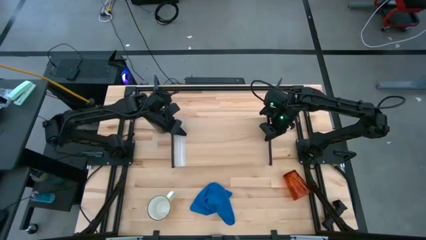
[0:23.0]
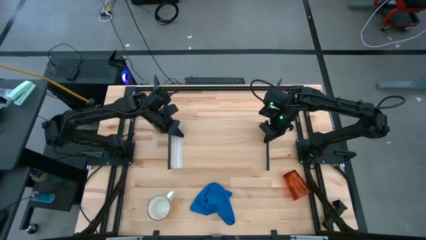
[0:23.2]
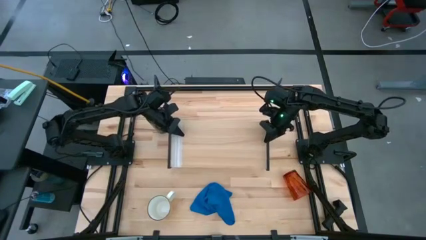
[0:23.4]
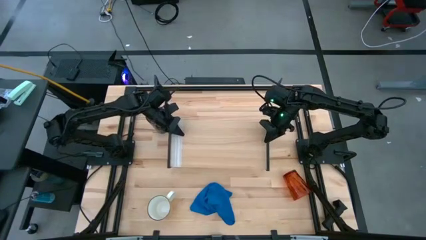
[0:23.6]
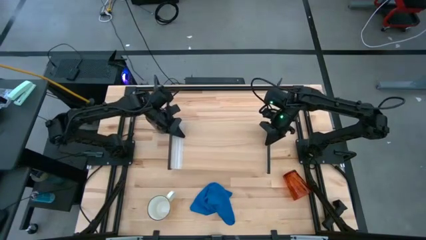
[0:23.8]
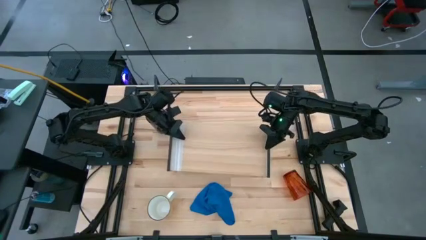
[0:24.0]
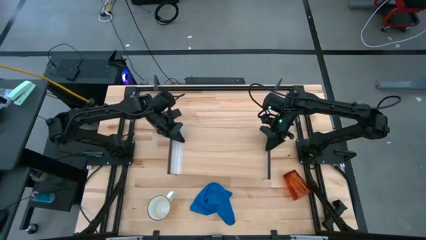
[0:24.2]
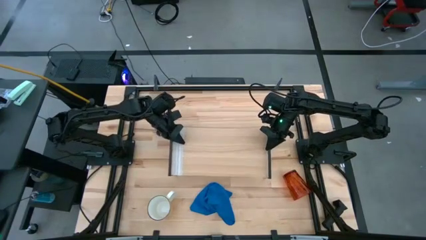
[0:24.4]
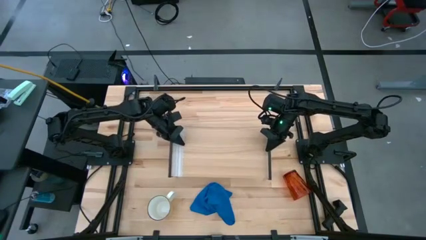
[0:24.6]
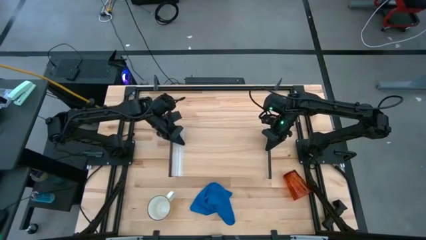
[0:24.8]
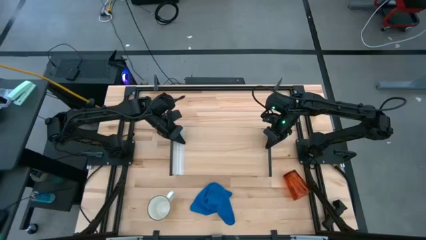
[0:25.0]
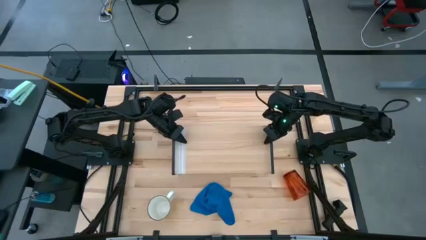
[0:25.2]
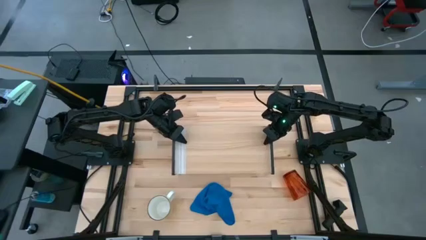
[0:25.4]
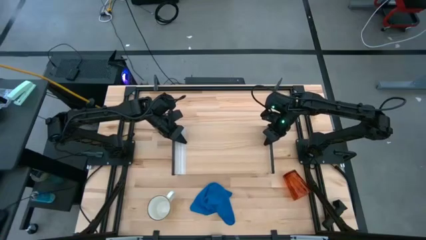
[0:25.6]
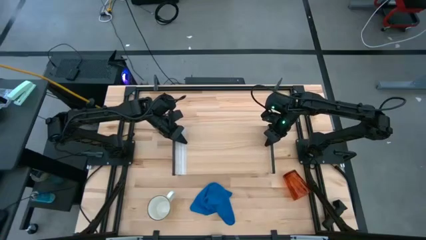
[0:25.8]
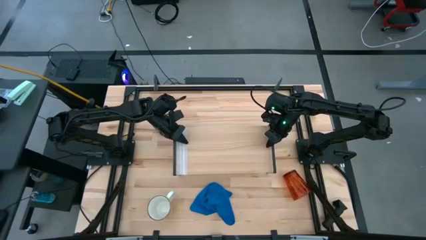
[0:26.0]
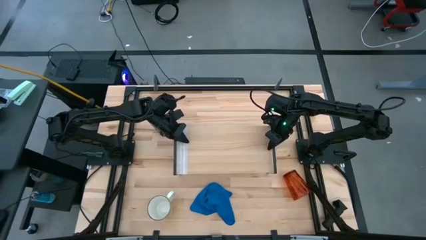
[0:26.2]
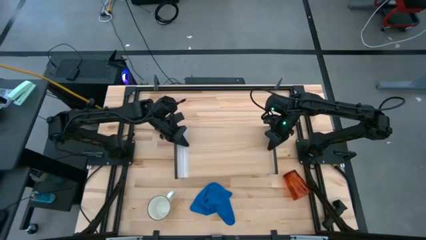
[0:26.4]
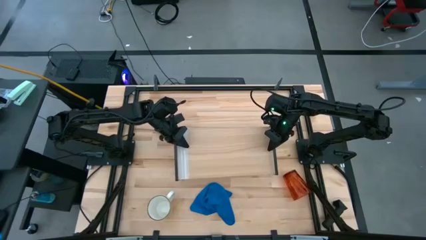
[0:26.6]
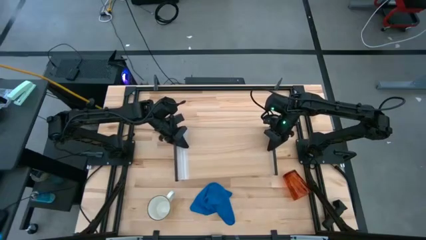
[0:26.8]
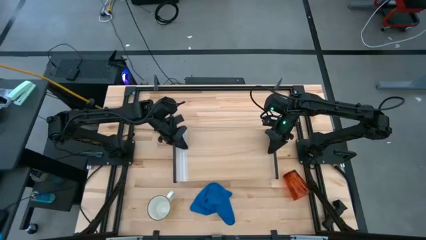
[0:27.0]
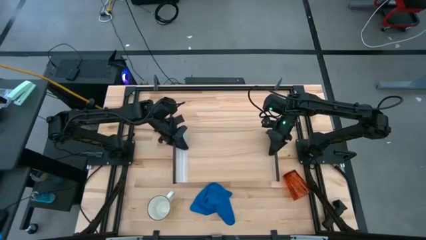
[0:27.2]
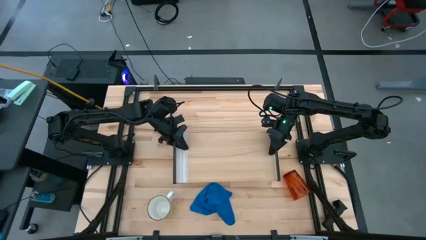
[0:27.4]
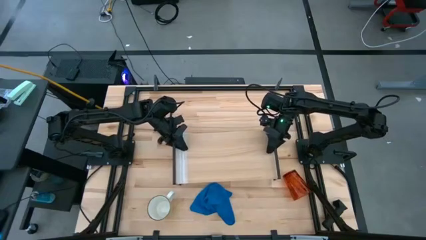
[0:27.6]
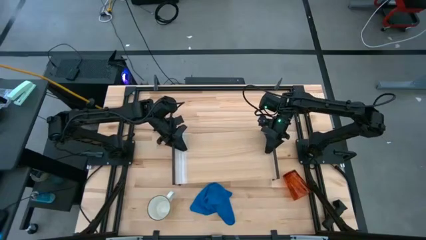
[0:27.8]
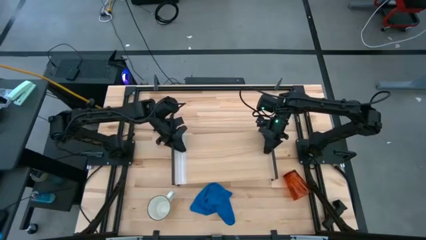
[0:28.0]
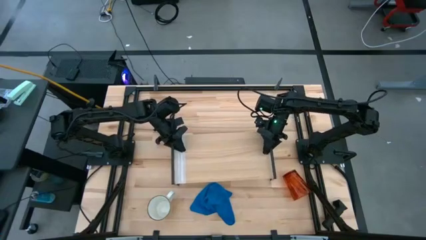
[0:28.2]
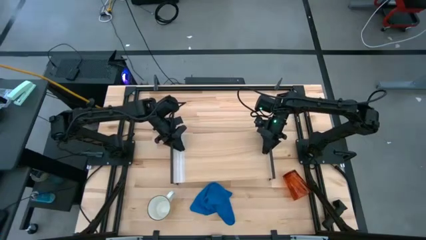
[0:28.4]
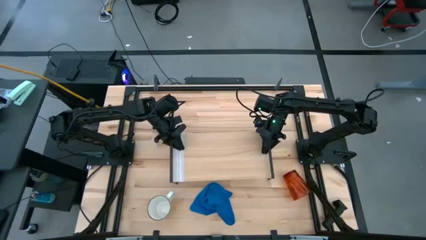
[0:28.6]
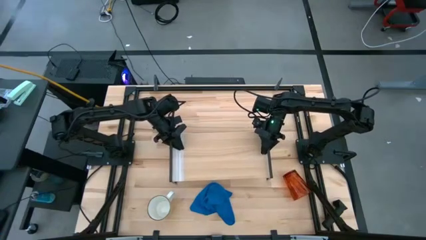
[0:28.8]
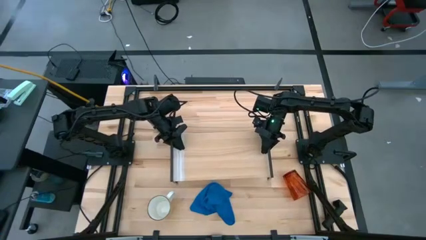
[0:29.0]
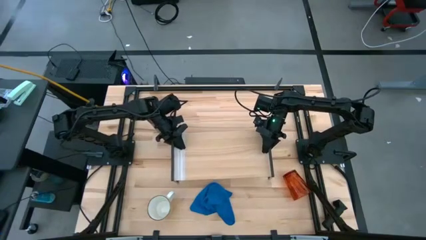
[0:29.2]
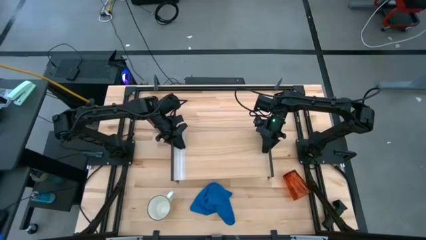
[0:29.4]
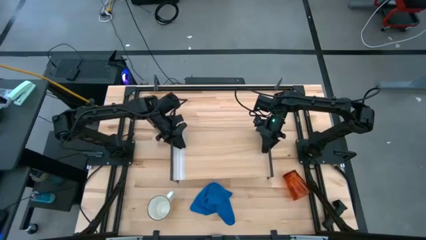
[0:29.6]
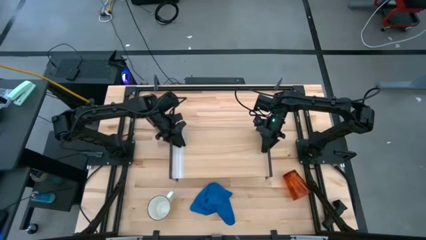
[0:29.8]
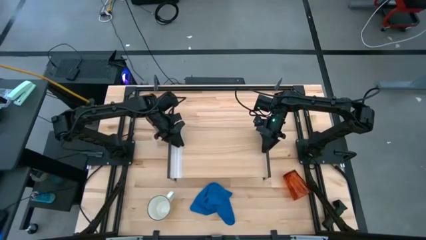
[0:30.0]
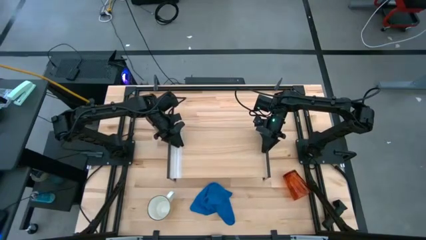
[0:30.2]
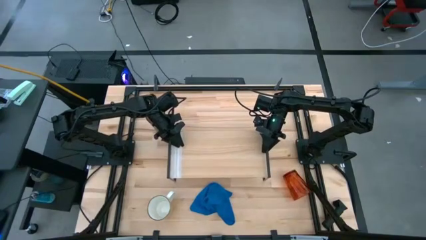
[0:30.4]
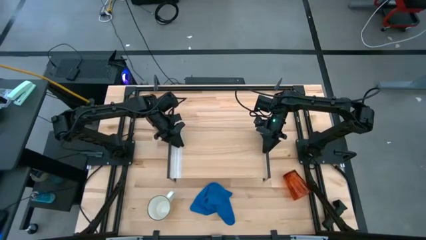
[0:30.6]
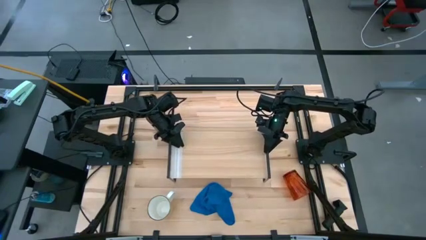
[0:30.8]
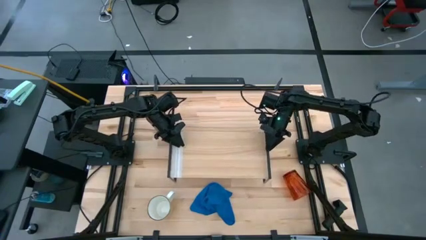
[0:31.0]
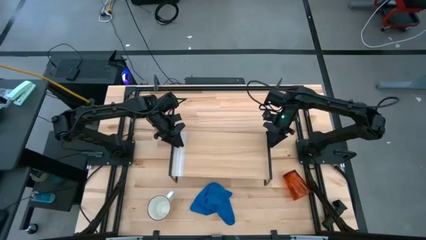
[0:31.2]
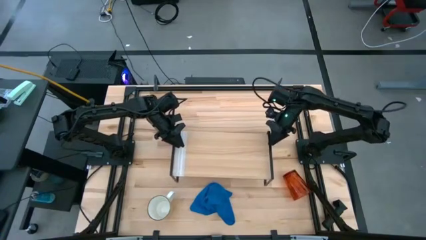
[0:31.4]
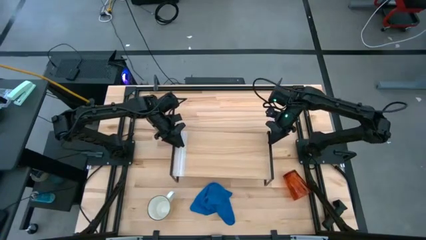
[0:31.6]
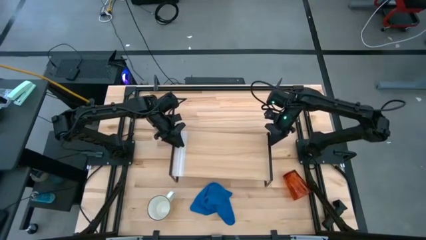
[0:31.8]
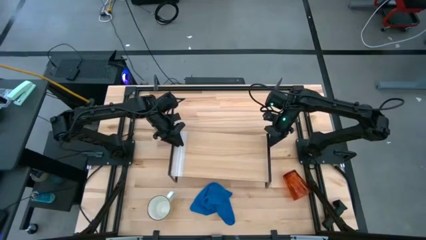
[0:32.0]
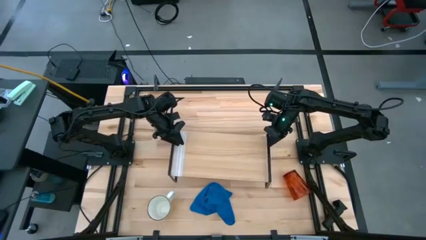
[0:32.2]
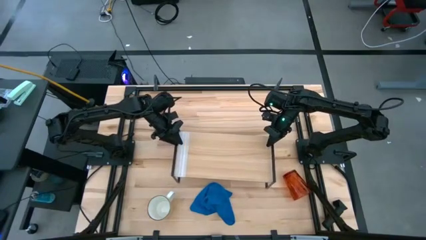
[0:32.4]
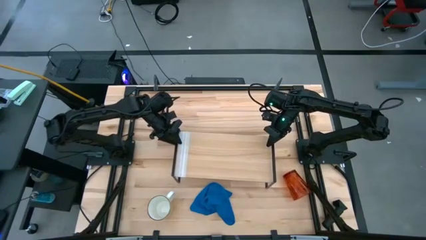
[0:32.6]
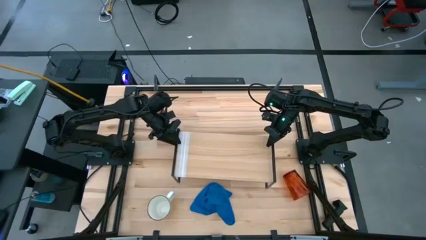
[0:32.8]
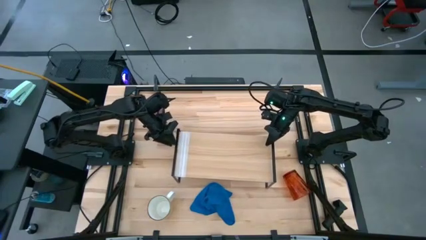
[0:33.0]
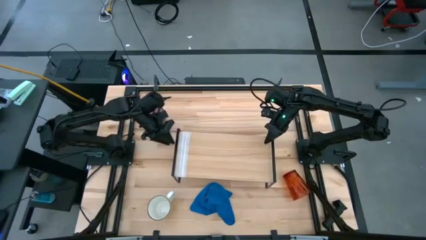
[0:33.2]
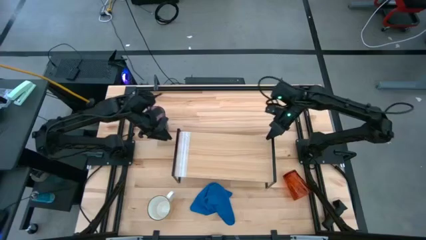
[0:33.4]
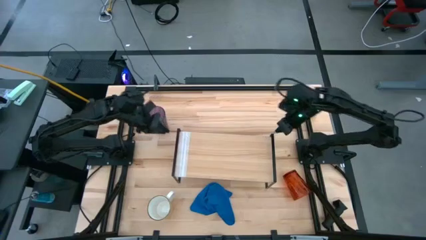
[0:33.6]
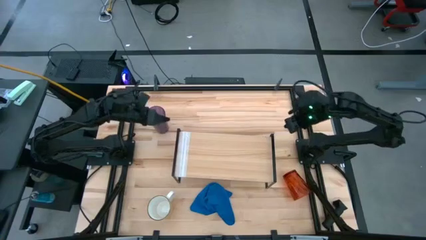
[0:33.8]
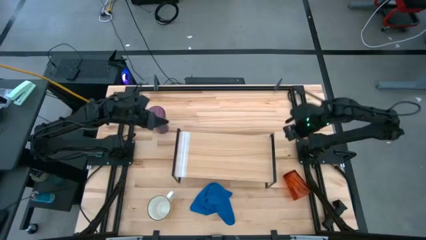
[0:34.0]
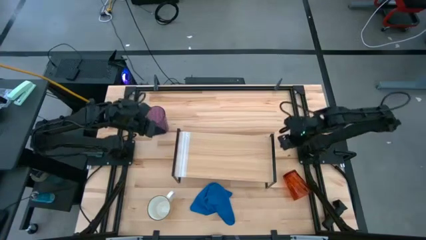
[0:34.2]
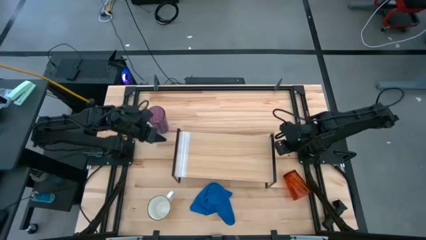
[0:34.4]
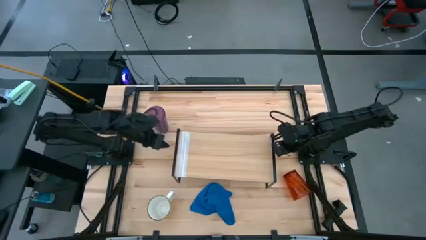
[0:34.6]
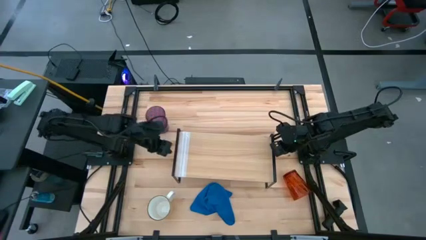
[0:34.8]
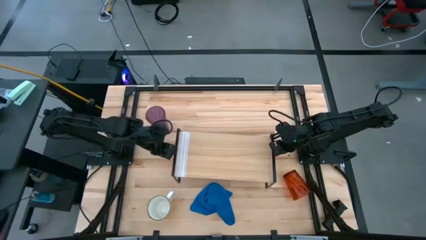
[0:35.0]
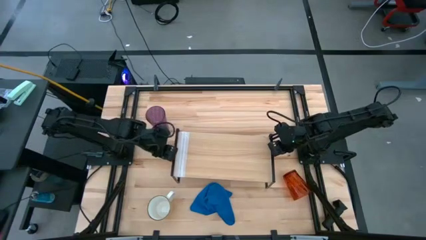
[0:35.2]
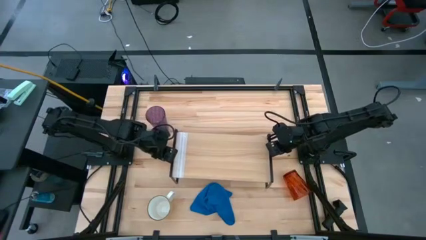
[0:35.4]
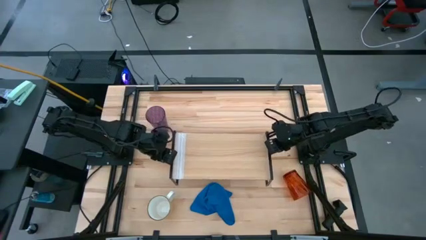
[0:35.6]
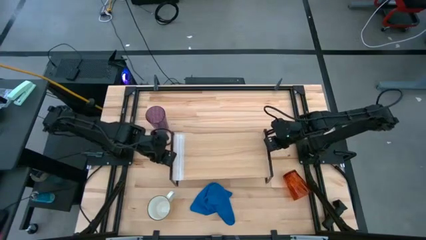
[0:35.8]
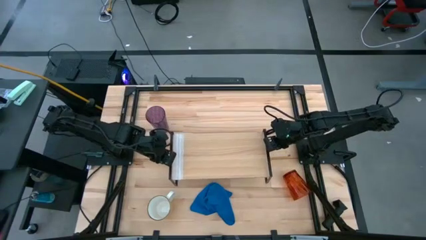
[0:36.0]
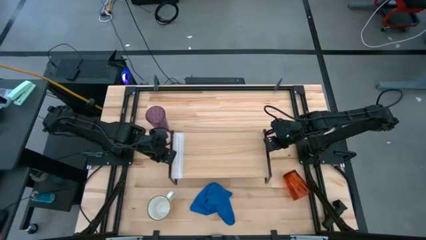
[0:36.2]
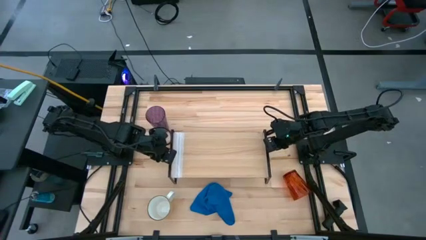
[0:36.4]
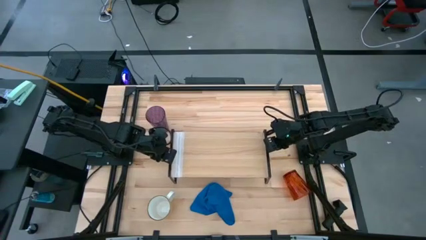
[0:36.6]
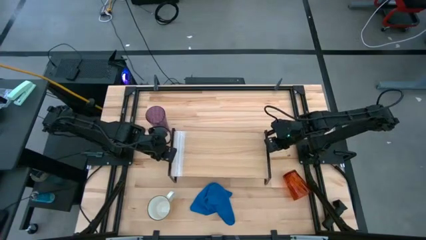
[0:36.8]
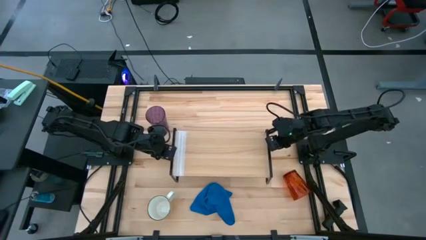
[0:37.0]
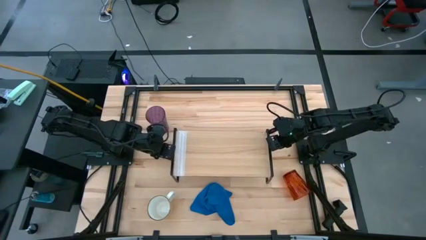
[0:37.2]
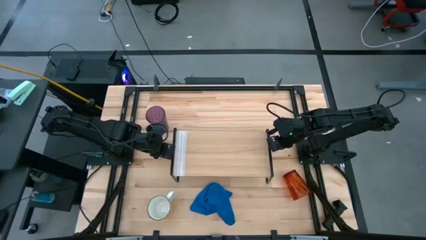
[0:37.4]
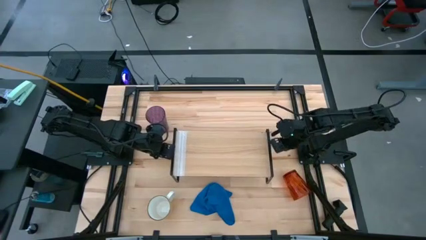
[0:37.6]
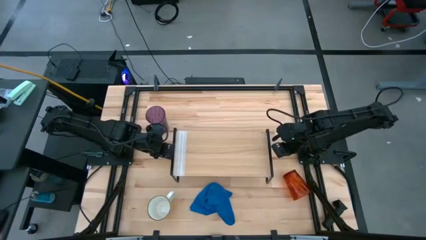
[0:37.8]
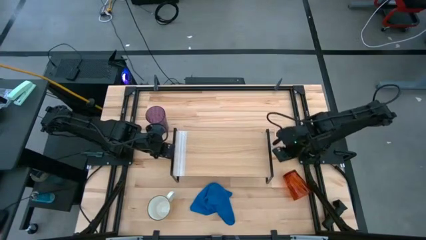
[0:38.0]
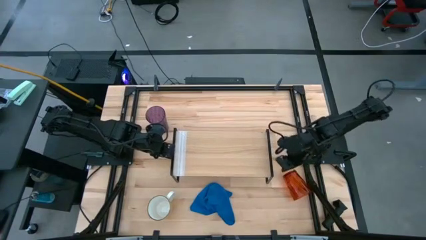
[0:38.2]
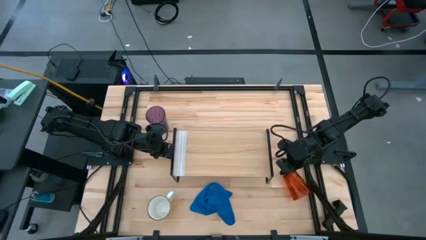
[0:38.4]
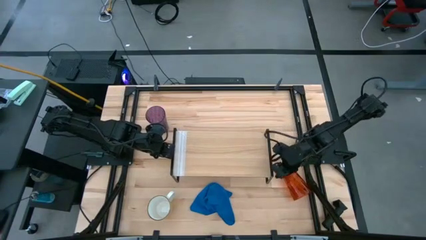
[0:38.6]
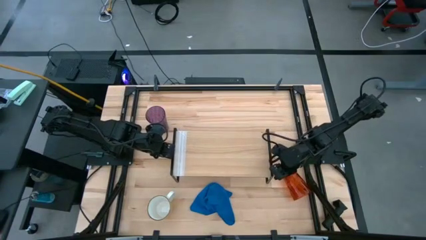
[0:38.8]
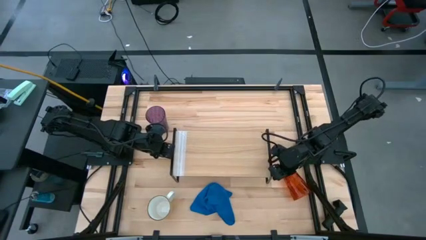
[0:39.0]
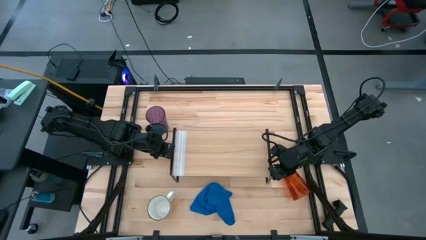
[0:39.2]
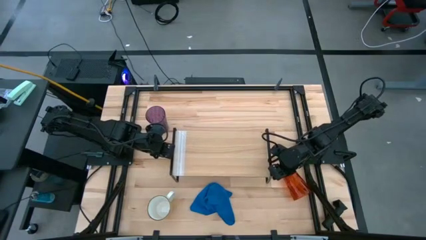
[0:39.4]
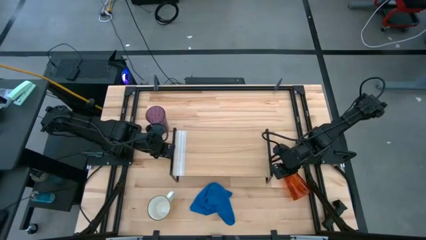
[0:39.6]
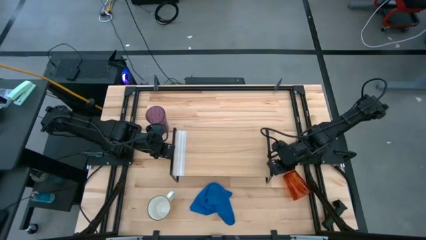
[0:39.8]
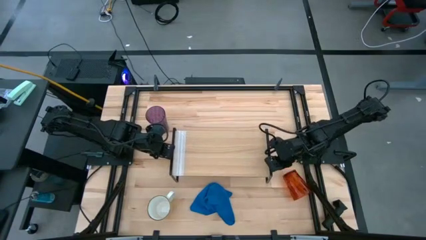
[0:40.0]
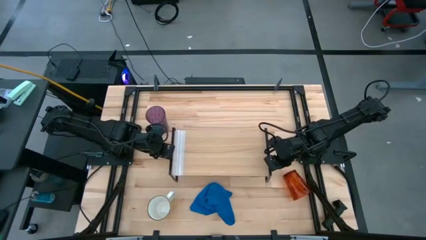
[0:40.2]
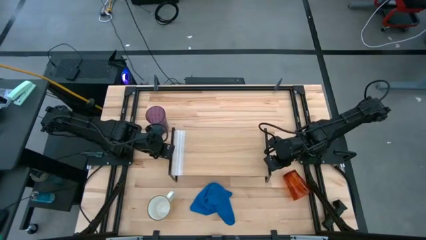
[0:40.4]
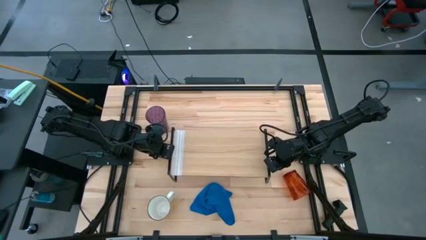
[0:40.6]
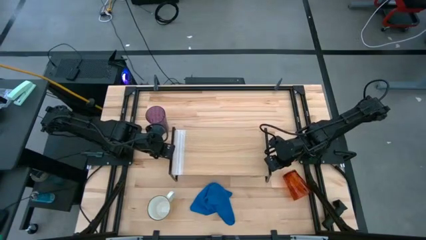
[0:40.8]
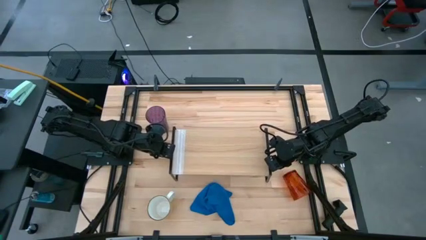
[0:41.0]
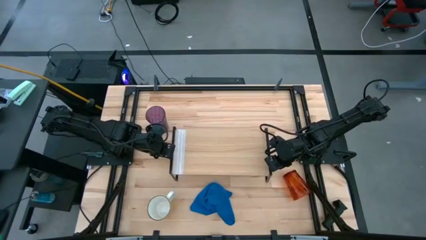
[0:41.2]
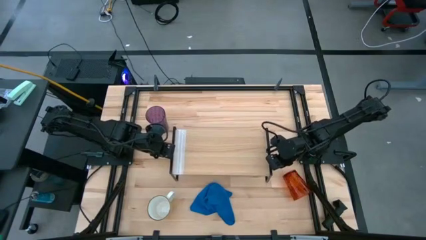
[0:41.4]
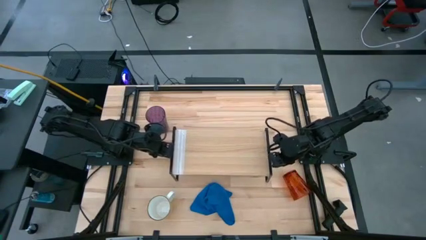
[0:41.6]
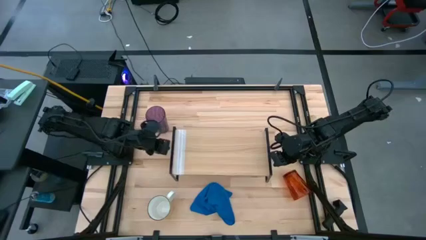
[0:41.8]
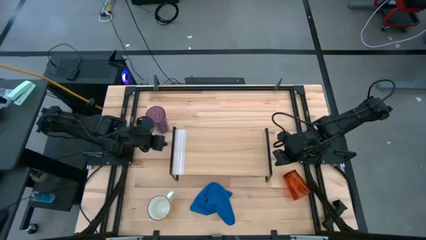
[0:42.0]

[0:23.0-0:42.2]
Task: Stack small to large cups/mugs on shelf
Move the shelf to the center of the table
